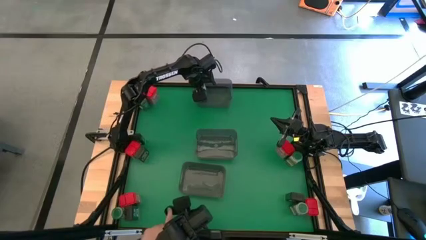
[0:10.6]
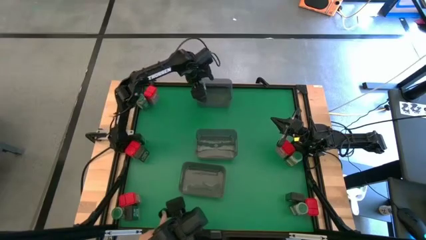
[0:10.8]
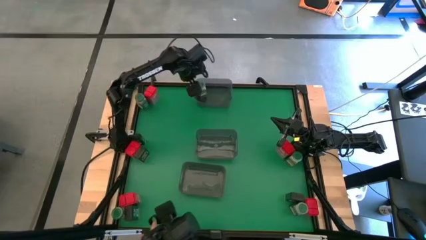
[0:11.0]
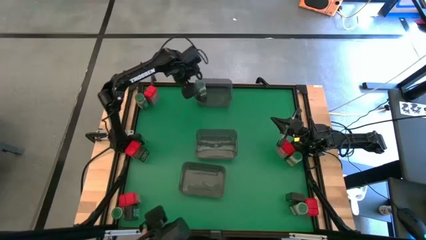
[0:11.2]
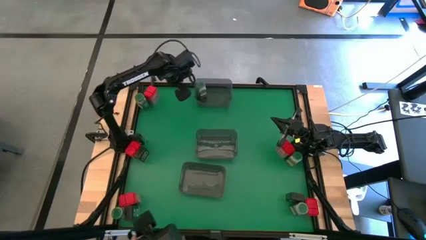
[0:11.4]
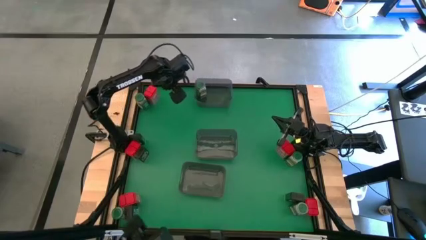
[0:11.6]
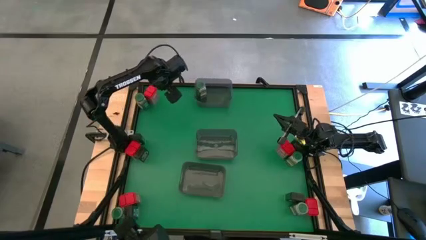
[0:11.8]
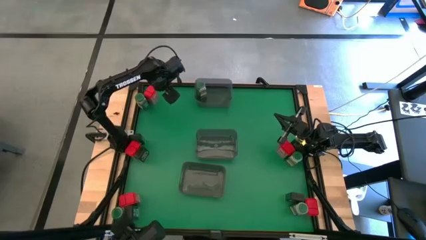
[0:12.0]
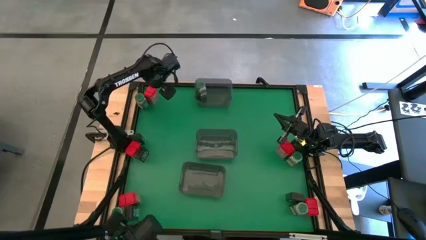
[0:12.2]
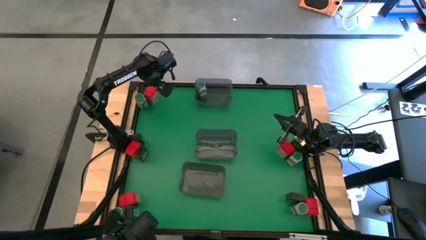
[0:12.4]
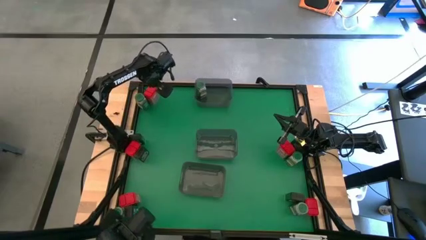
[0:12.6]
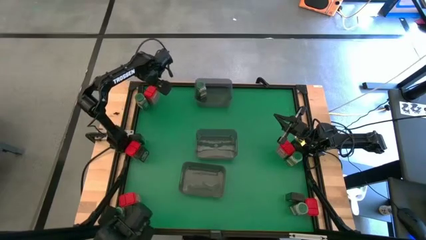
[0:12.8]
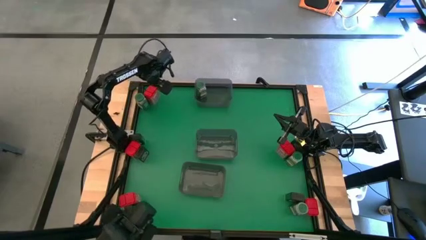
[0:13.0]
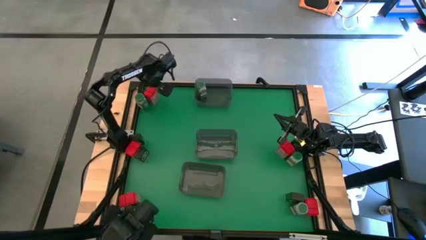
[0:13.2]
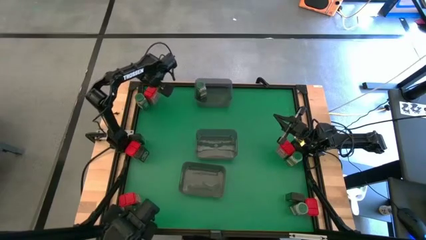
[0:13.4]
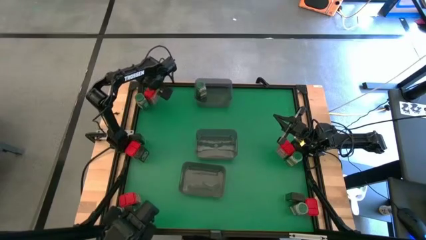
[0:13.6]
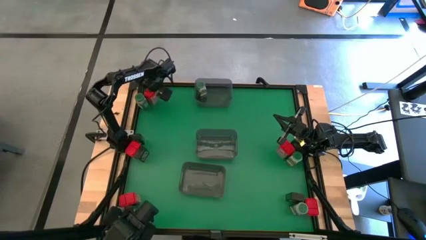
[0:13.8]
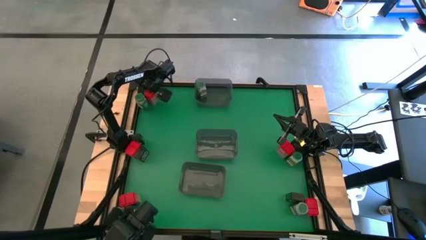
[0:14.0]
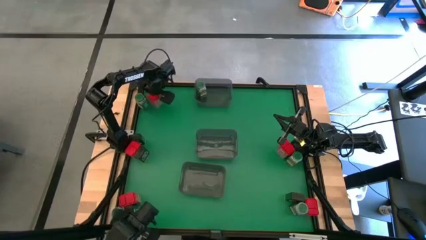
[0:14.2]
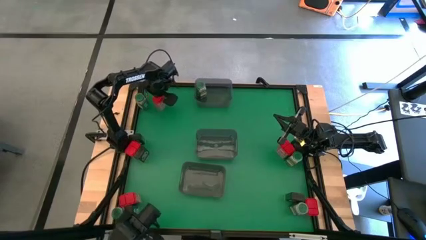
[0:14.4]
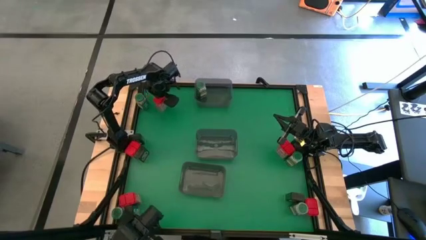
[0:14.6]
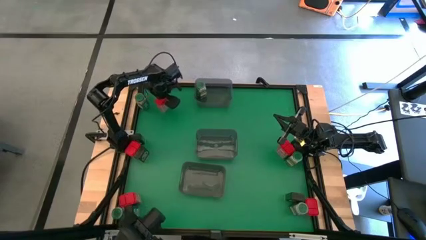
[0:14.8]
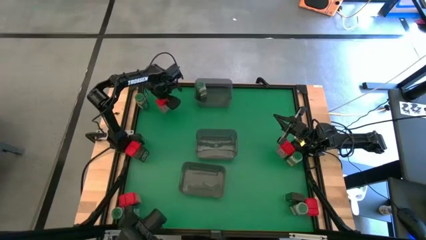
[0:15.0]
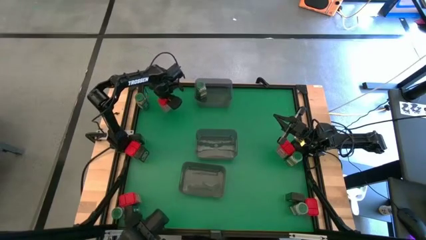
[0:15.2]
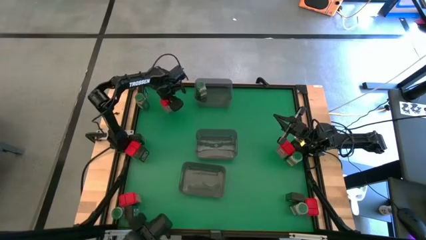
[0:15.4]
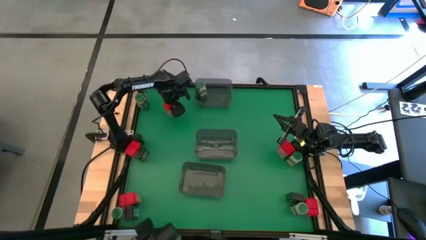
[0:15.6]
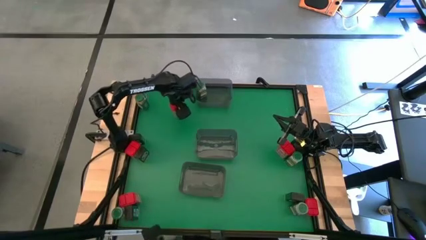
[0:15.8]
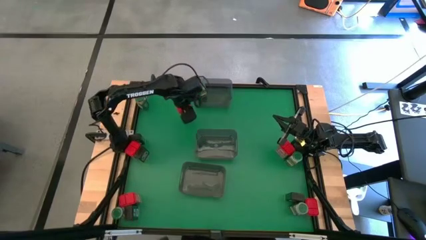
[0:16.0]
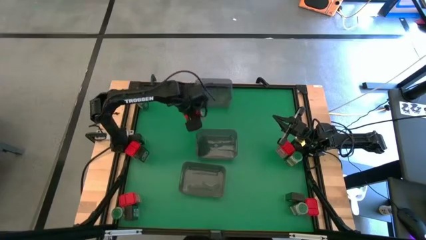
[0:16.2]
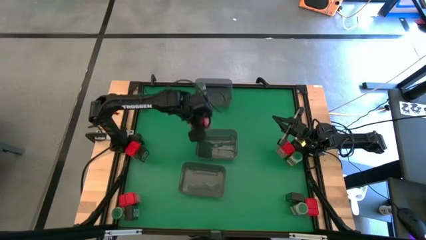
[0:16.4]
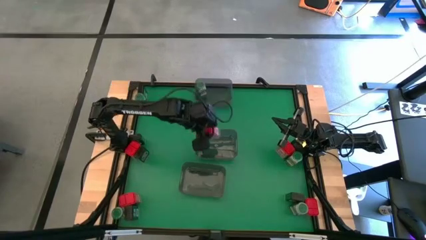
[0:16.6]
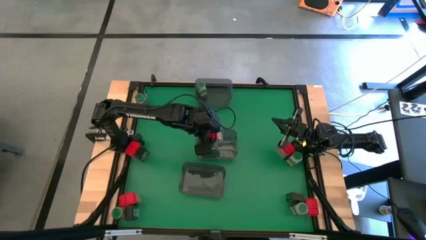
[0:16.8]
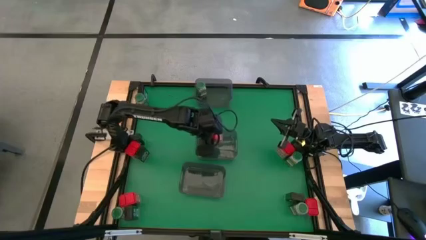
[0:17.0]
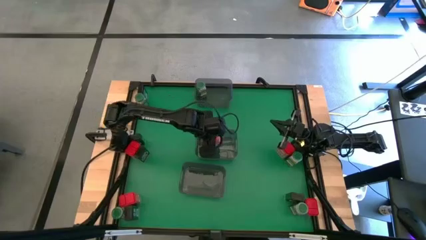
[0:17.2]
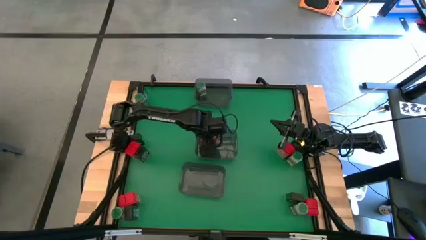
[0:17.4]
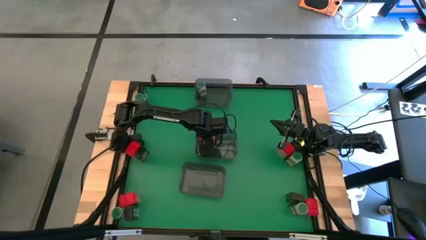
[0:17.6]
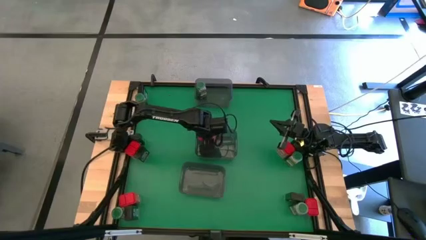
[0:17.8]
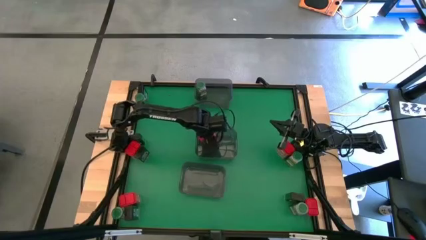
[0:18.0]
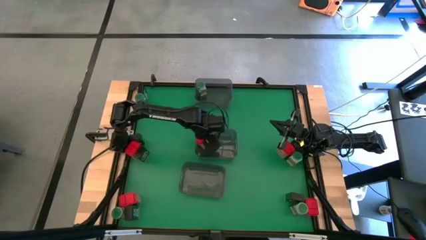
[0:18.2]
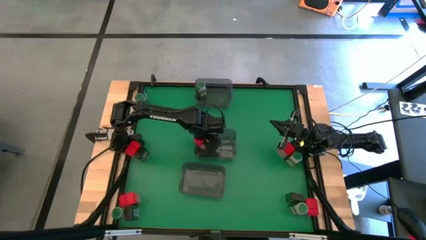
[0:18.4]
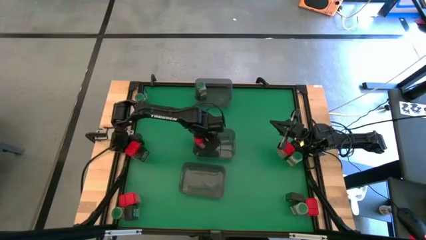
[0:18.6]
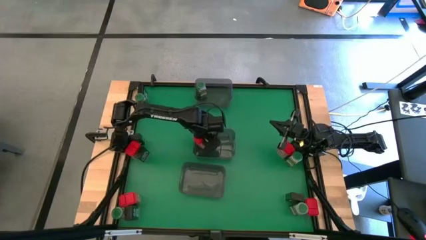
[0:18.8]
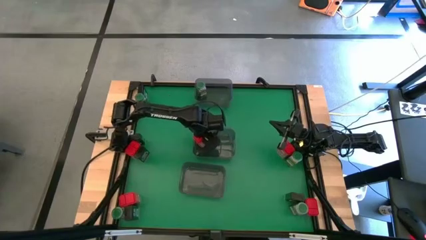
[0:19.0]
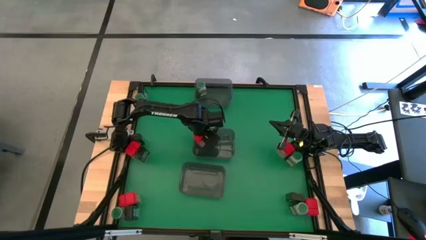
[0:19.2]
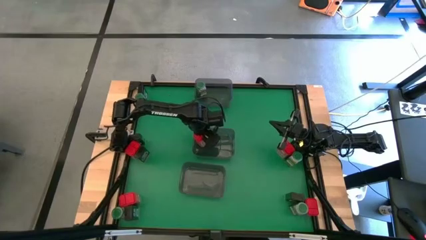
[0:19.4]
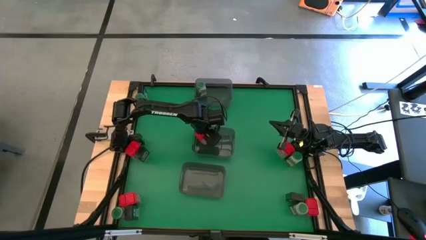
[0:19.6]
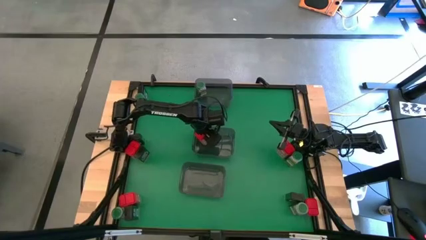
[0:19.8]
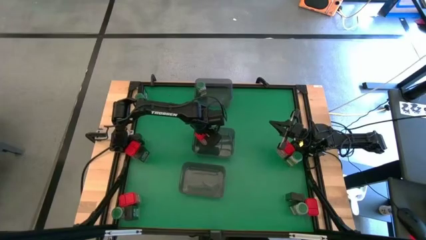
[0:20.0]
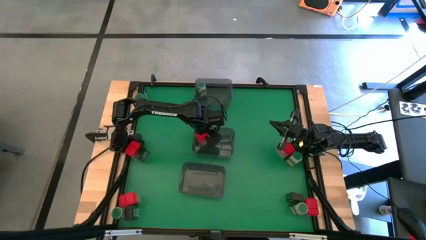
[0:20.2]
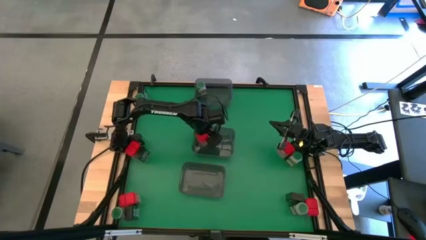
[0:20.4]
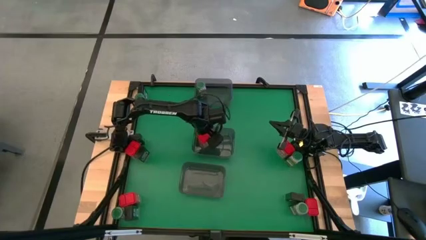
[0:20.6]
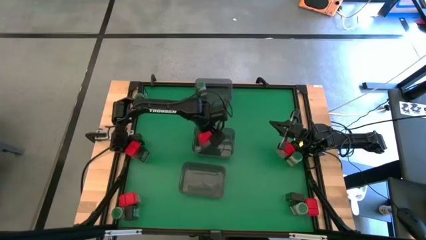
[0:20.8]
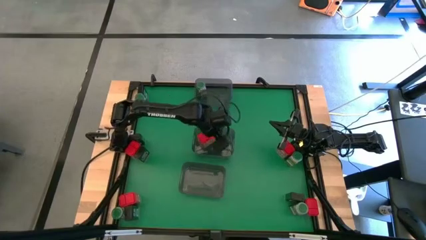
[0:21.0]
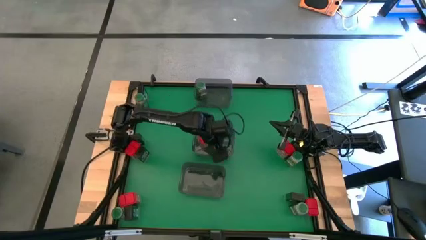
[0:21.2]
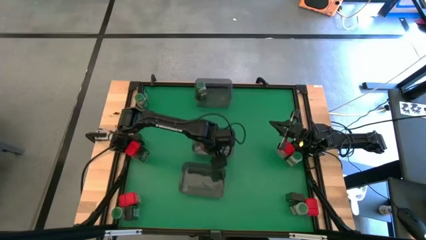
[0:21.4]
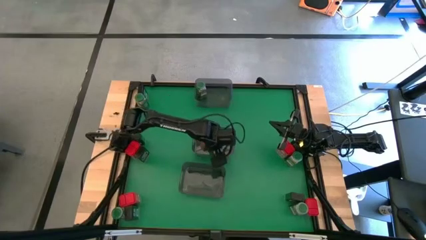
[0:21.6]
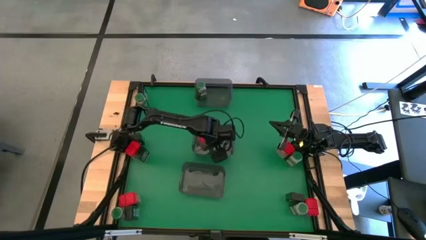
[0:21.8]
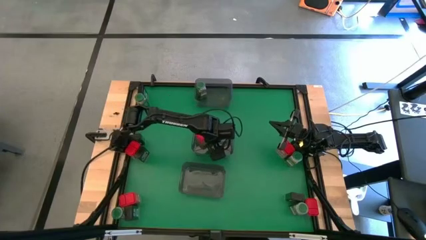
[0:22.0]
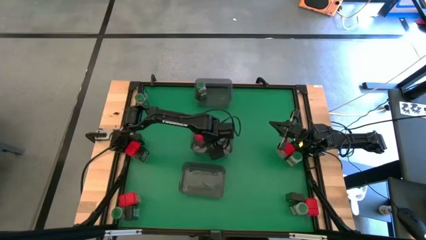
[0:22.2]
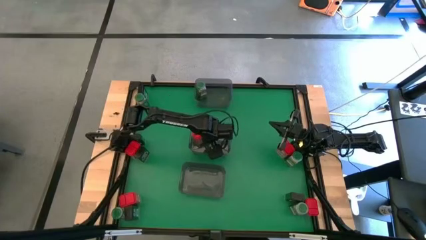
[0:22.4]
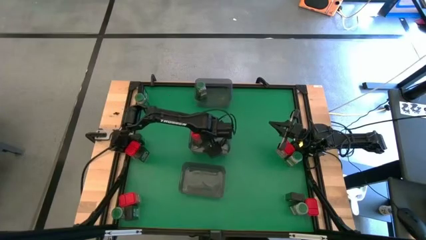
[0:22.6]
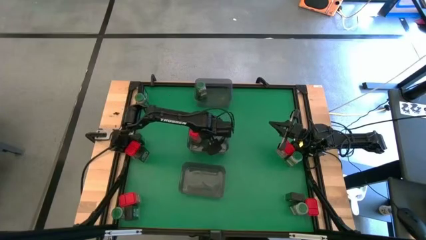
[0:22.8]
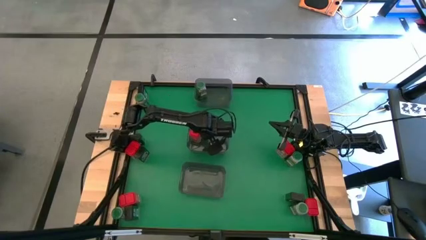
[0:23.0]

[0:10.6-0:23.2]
Task: Sort spices by type
Put the red seasoning can into the middle gray bin
